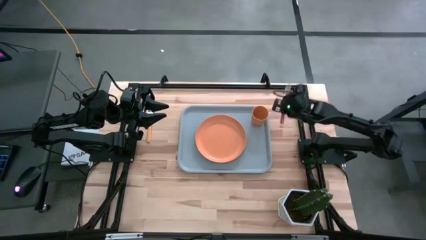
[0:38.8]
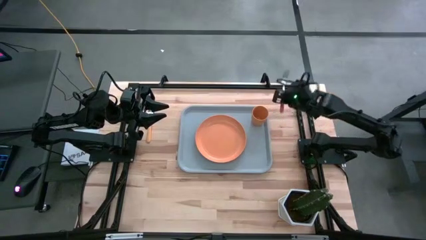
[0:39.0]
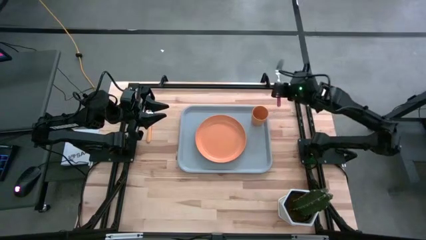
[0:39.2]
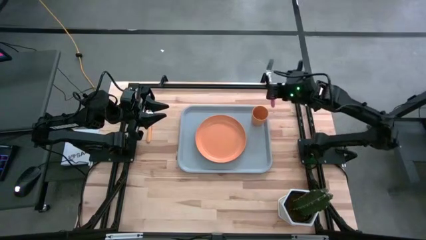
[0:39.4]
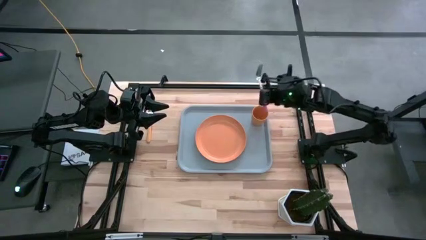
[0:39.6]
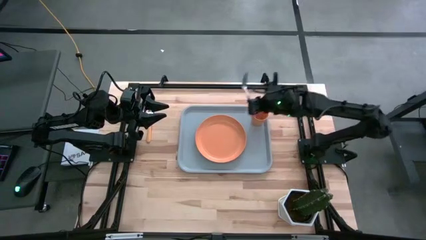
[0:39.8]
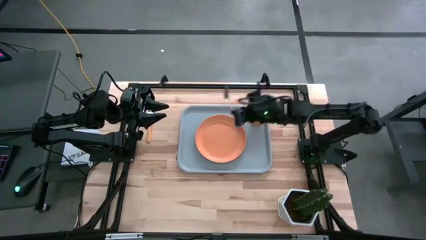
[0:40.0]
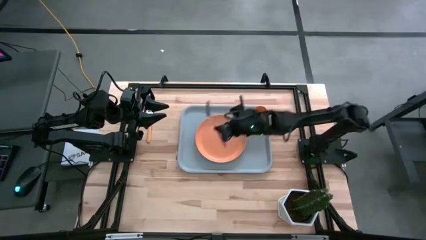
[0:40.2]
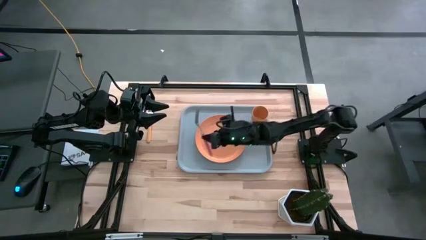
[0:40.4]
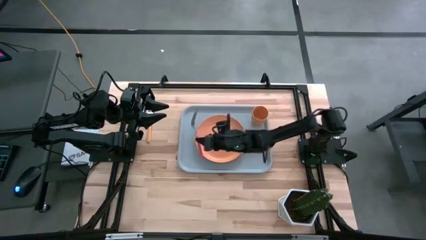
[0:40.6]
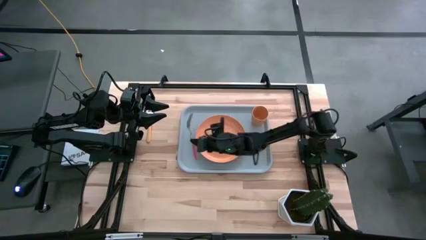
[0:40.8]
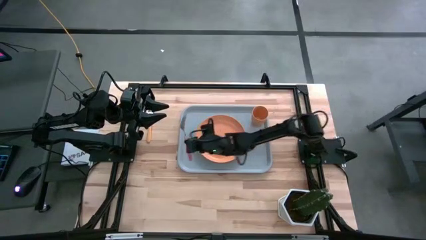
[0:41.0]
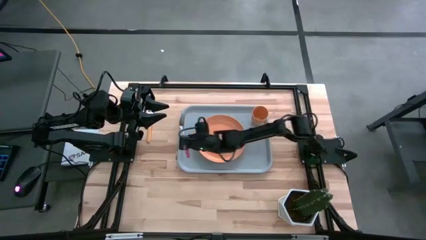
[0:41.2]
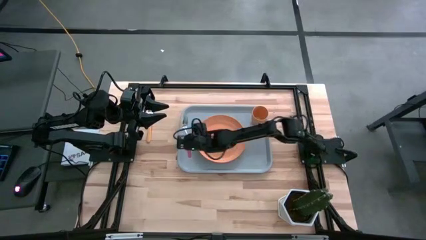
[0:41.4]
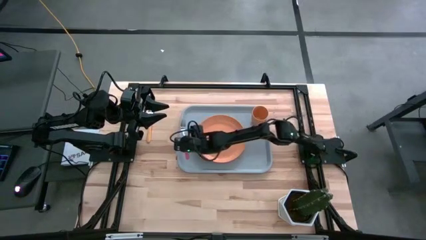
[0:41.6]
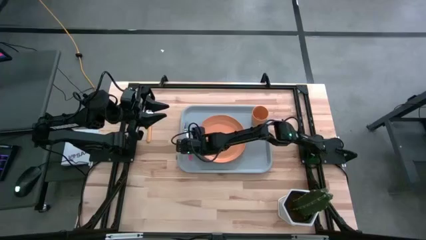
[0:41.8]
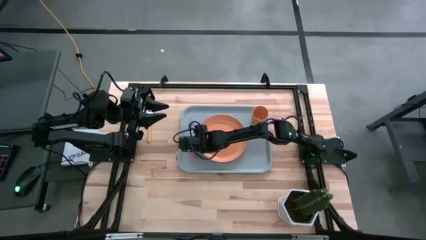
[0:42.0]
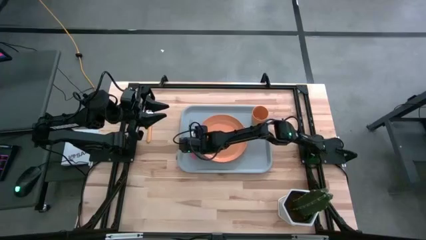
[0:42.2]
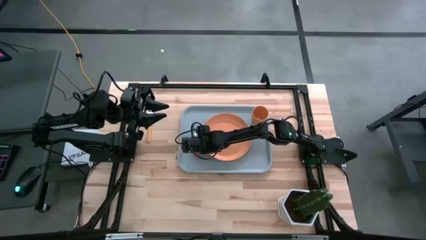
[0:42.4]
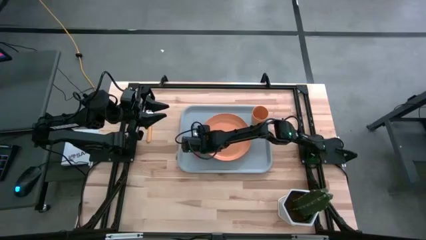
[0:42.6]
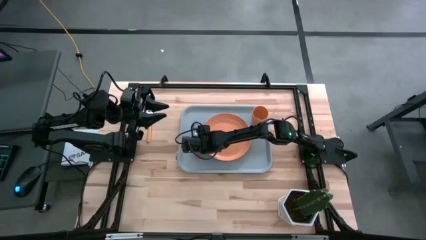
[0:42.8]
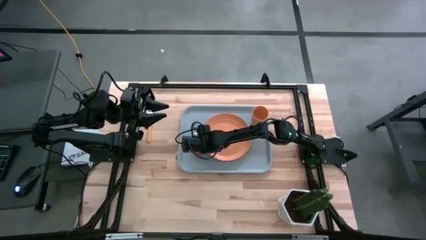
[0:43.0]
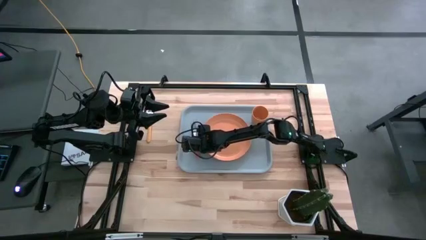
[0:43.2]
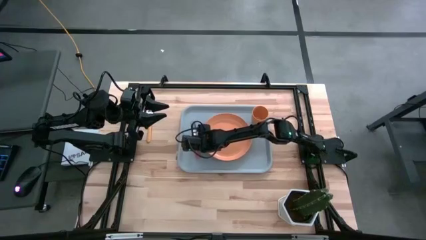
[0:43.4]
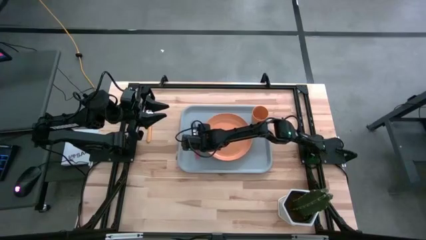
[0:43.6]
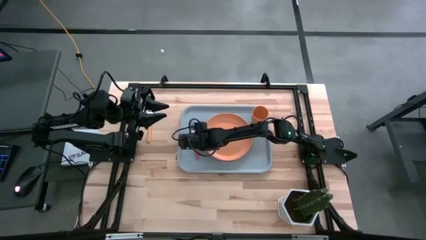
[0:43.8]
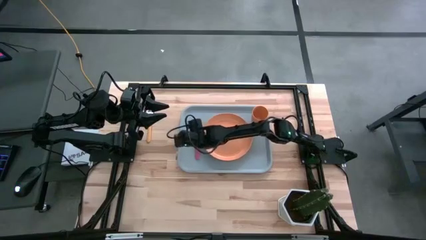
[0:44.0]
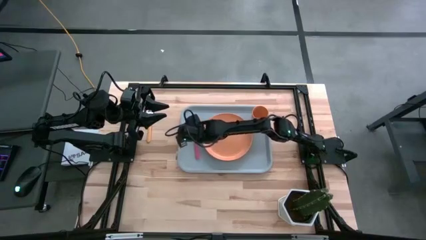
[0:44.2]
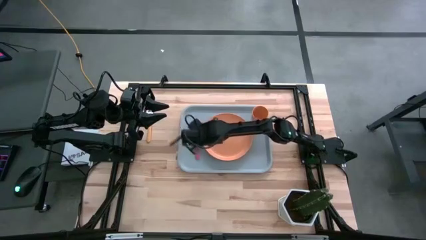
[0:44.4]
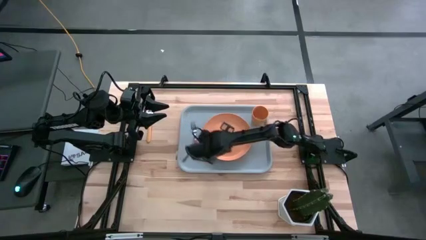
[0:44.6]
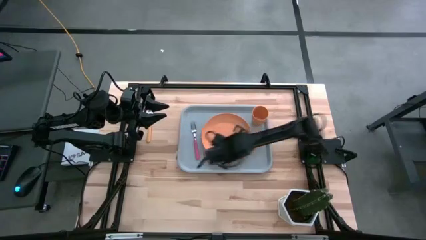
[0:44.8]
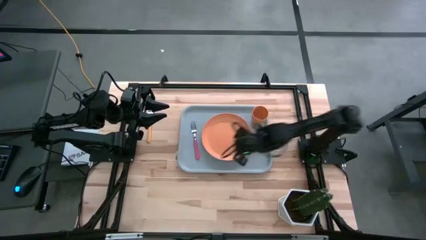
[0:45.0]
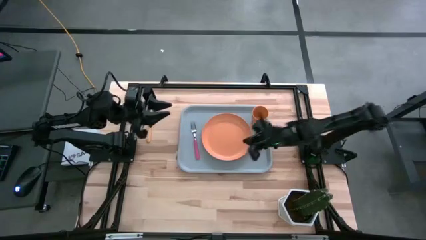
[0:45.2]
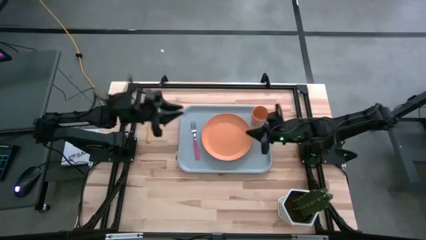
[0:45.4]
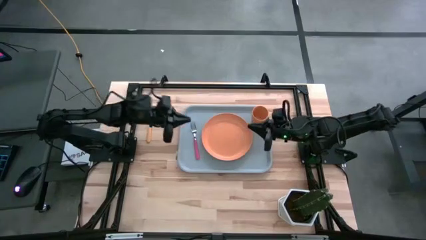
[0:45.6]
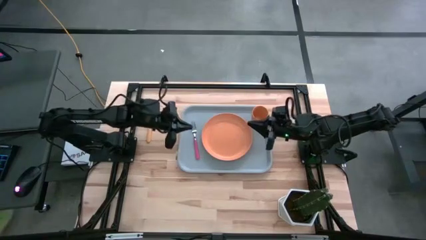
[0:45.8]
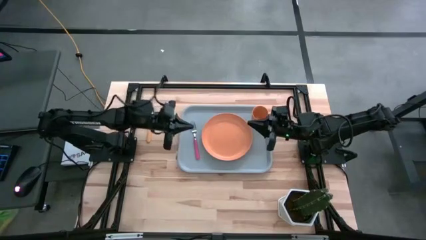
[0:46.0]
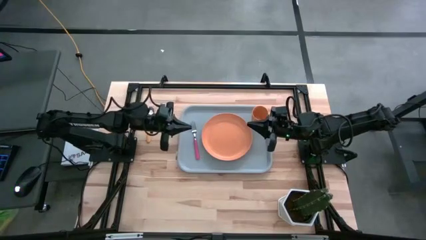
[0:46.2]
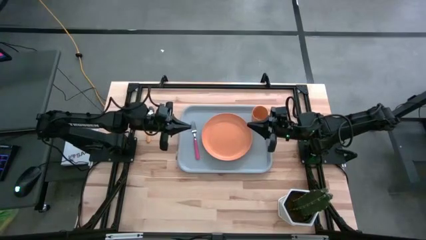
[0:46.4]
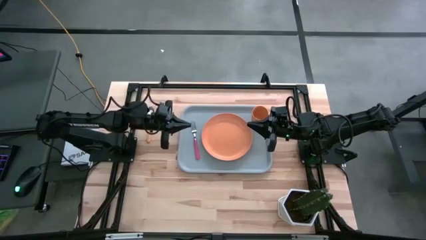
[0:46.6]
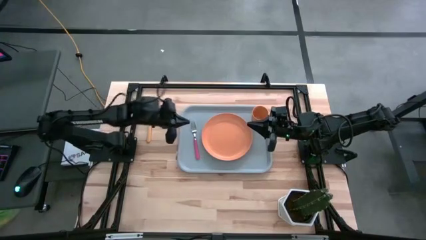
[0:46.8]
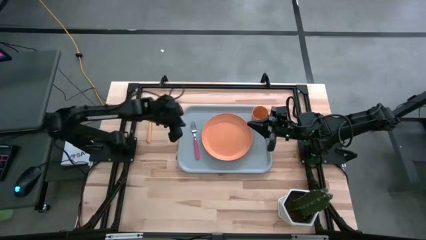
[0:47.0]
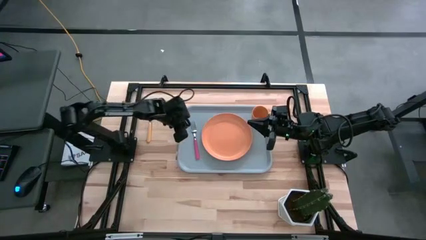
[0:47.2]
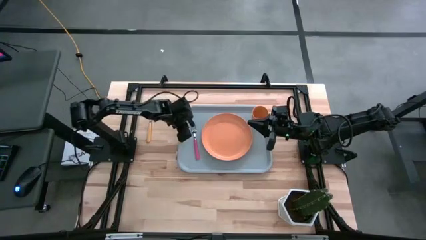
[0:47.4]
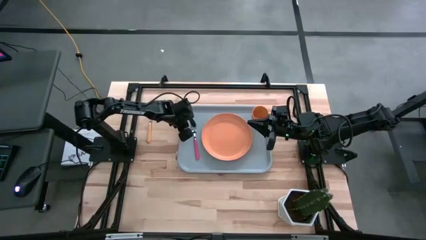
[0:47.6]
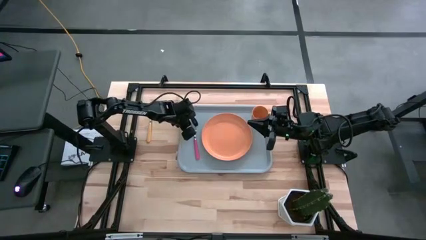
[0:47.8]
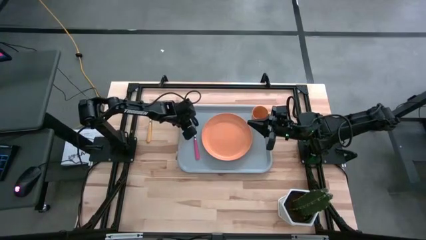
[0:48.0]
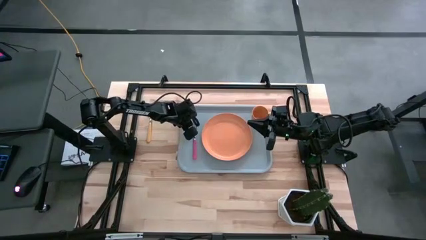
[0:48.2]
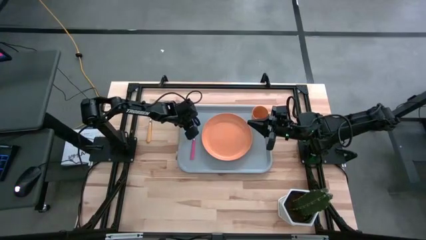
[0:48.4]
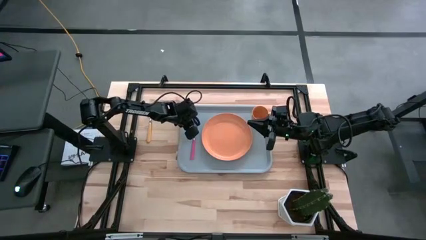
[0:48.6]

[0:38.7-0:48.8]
Task: Pick and place plate/cup/fork/spoon on tray
Put the pink fork on the gray tray to the left of the orange plate
